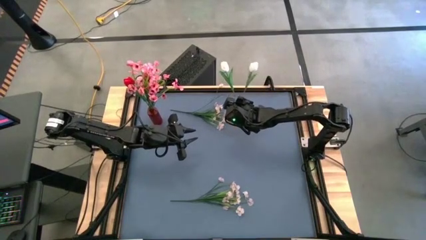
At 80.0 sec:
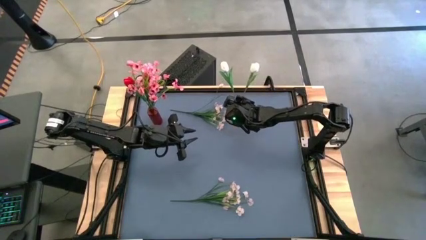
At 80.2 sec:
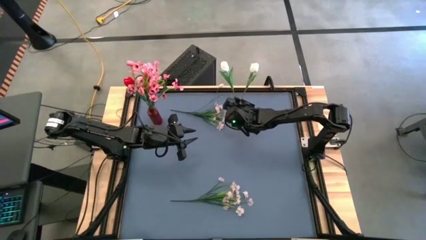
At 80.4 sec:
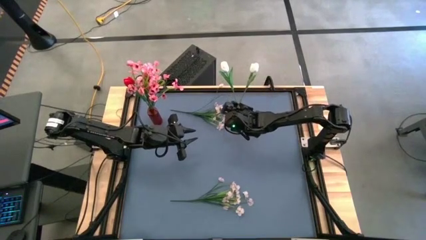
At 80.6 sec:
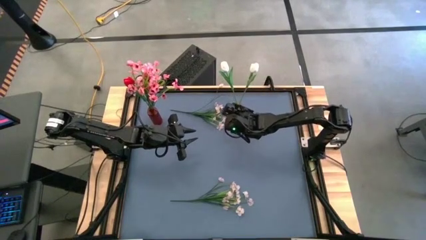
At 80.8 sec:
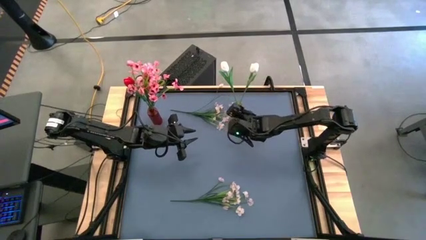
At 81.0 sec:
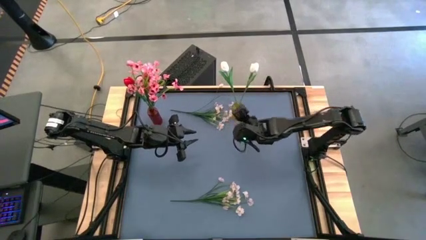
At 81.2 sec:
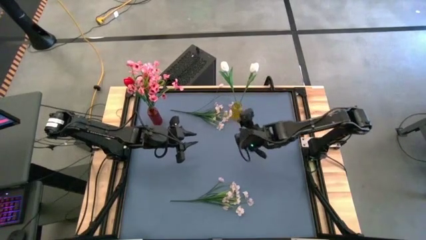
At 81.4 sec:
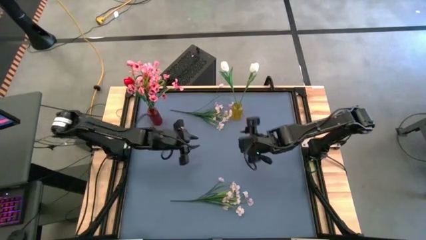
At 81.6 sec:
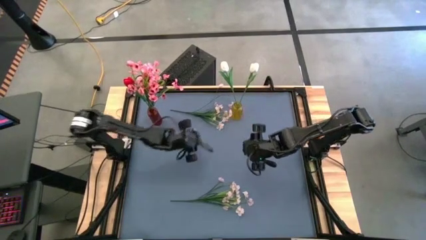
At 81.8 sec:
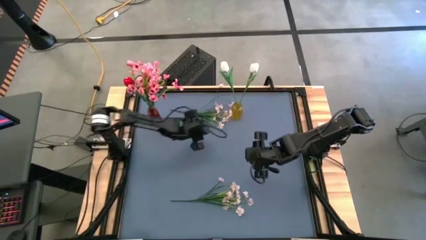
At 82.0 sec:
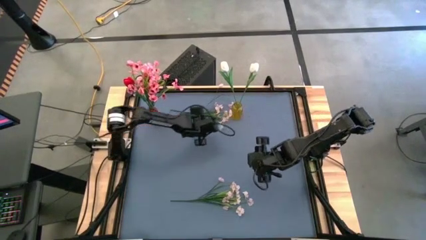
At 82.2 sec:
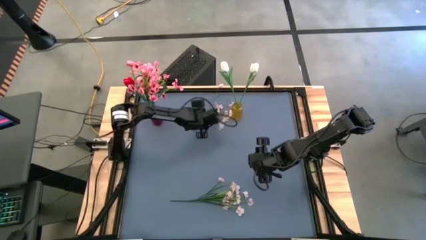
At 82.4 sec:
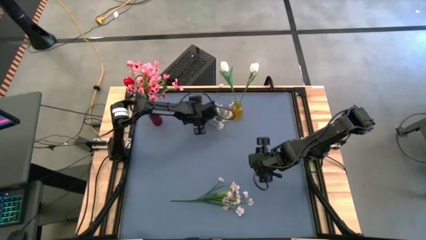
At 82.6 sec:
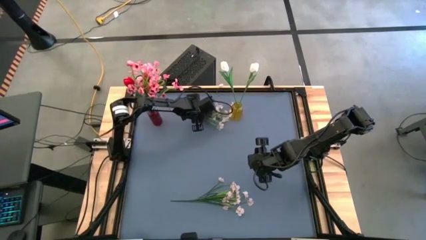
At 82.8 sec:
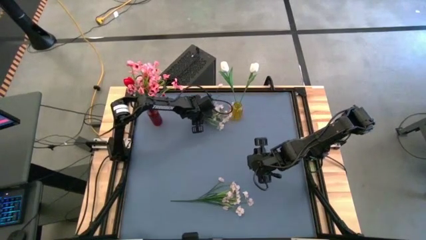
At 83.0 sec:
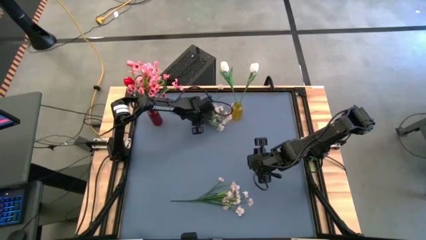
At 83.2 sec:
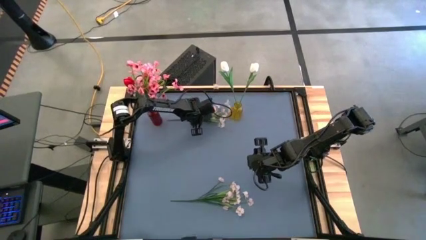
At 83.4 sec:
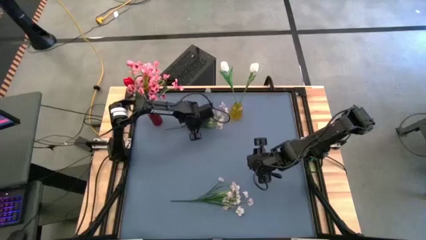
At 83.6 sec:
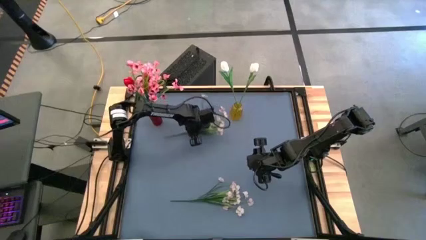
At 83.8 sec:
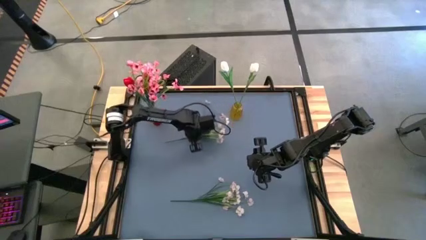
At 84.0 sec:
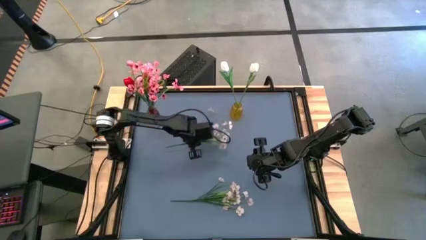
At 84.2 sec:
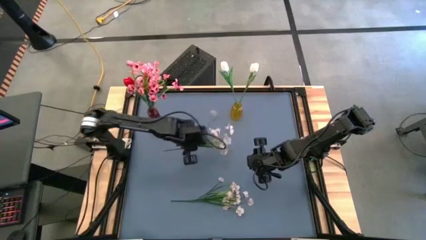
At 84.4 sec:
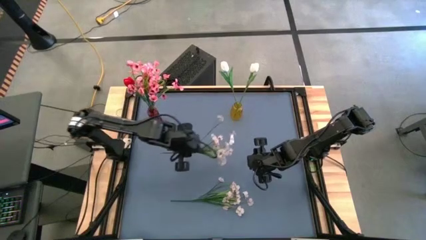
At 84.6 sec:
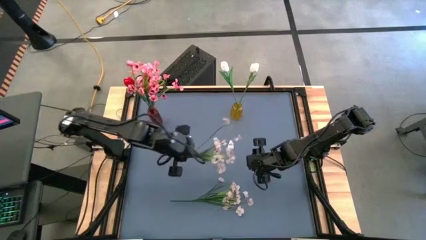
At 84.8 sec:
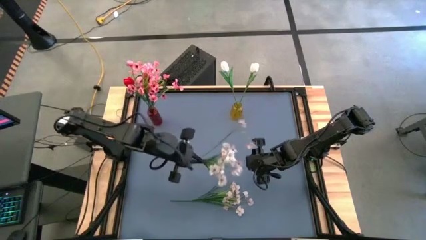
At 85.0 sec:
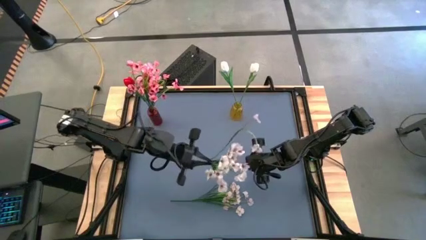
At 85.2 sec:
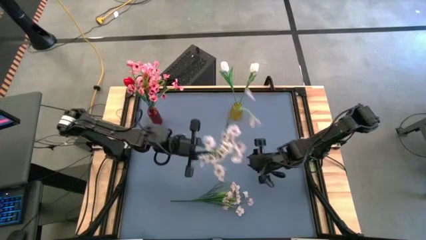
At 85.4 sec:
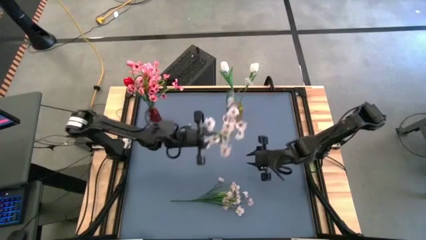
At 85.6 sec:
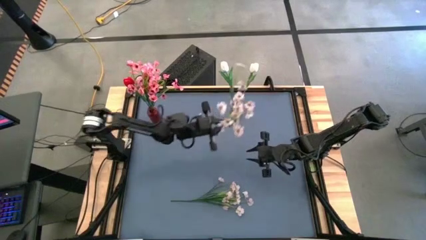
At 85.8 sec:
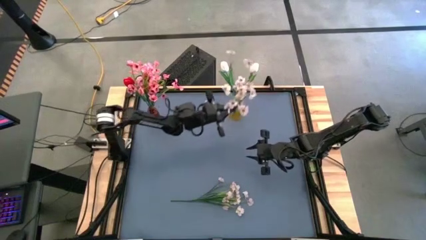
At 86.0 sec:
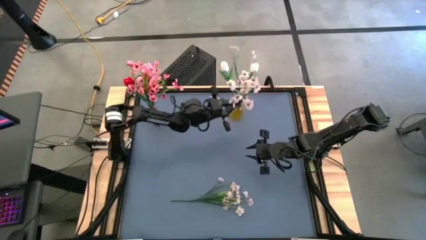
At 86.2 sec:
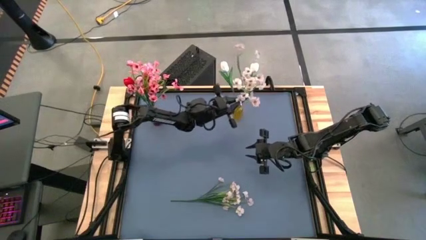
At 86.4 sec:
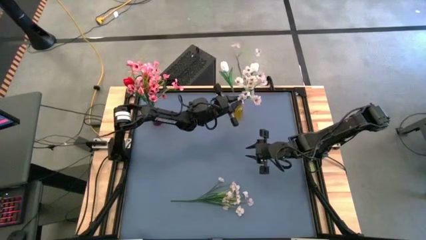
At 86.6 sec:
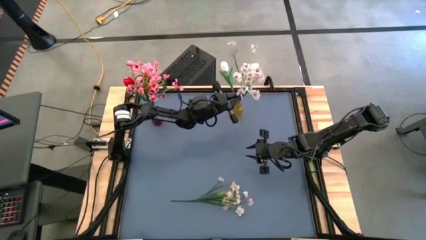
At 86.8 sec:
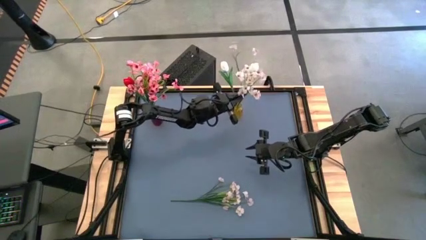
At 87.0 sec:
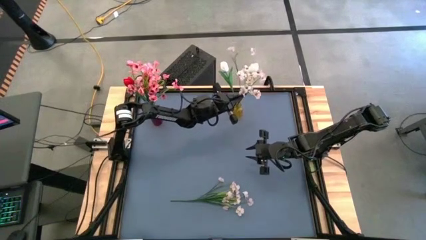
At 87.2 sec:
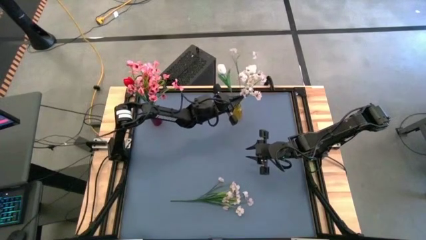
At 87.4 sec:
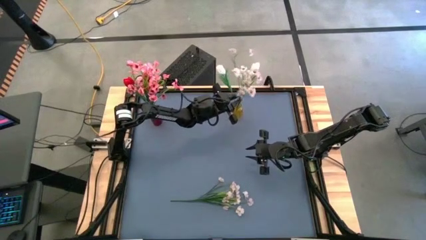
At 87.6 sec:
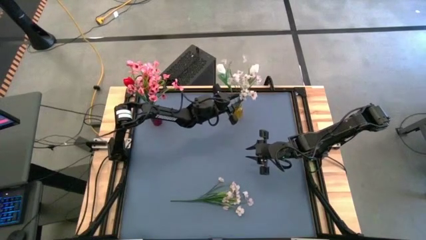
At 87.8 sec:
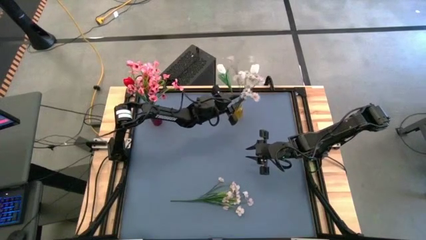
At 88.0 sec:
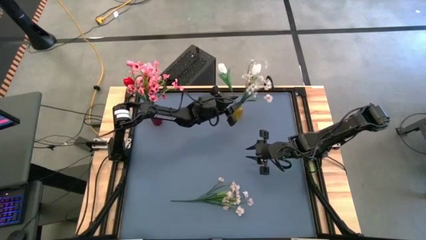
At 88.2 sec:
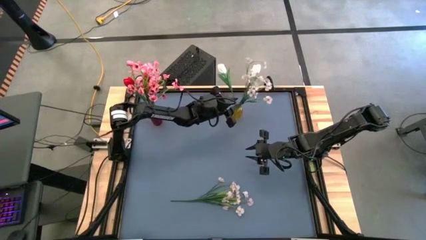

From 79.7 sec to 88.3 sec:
Task: Sort flowers into vase by color
Put the top white flowers into the yellow vase

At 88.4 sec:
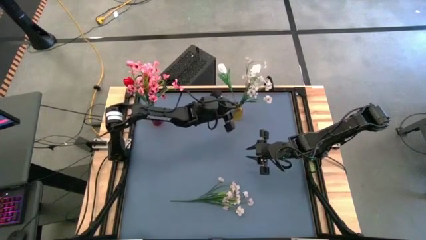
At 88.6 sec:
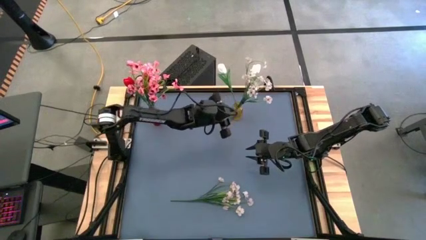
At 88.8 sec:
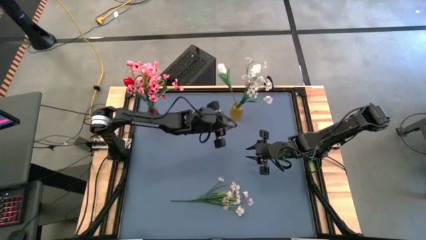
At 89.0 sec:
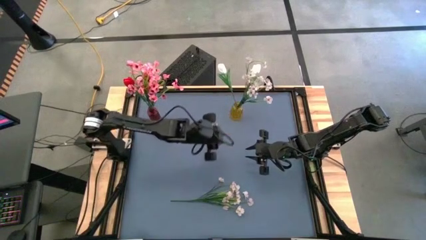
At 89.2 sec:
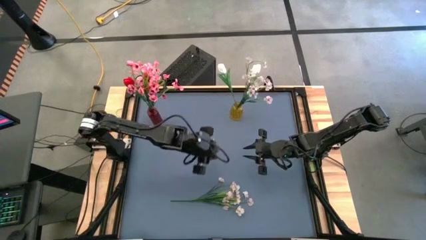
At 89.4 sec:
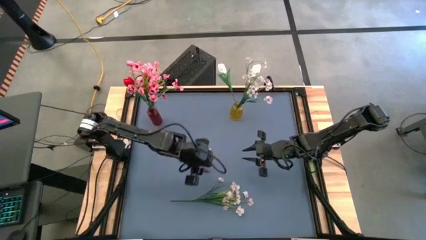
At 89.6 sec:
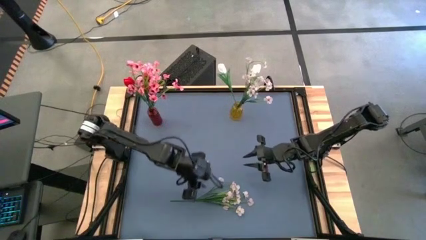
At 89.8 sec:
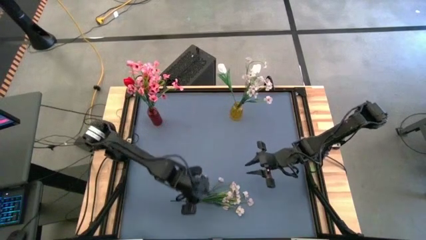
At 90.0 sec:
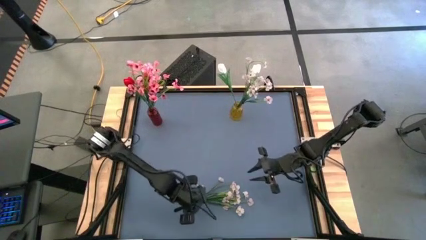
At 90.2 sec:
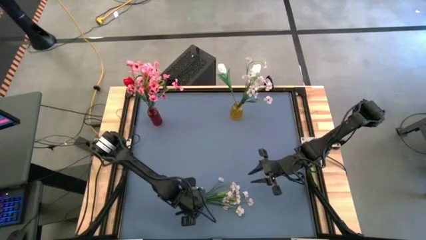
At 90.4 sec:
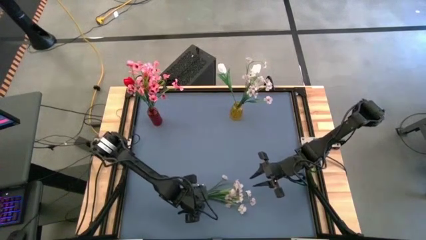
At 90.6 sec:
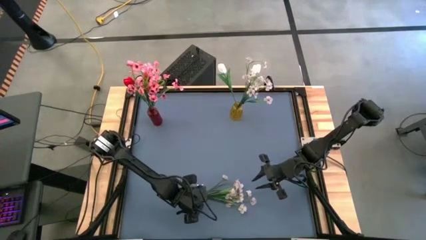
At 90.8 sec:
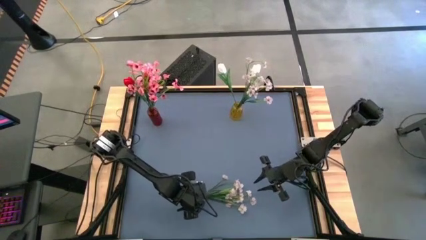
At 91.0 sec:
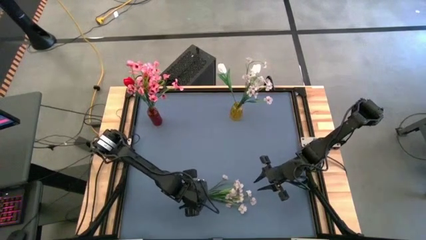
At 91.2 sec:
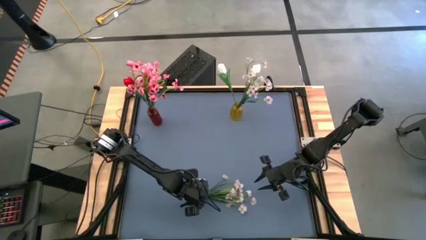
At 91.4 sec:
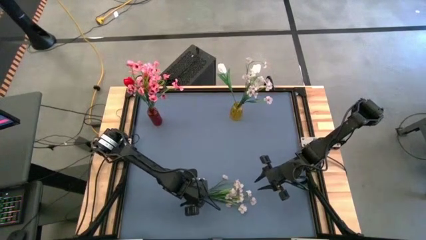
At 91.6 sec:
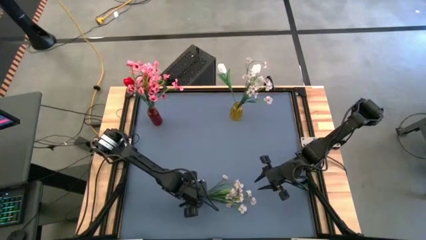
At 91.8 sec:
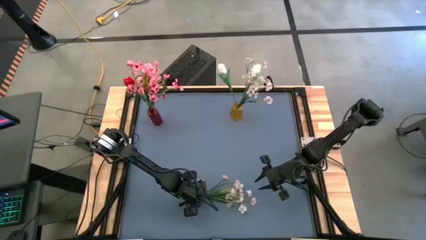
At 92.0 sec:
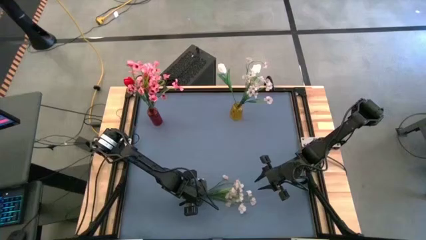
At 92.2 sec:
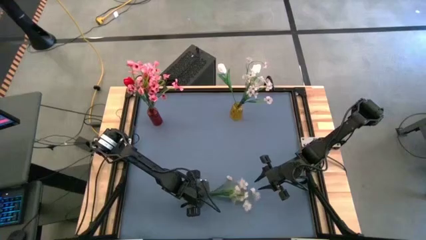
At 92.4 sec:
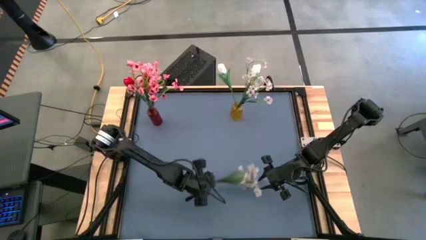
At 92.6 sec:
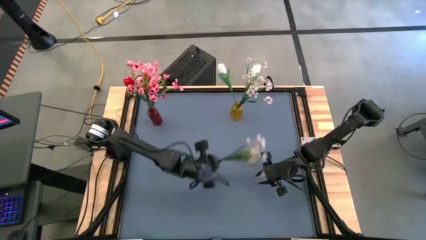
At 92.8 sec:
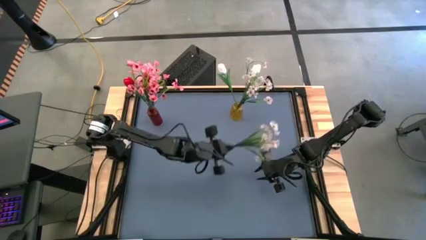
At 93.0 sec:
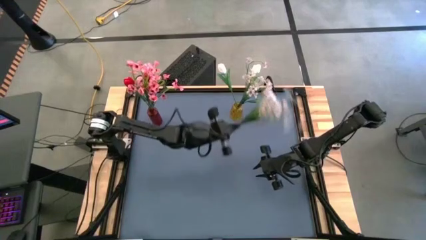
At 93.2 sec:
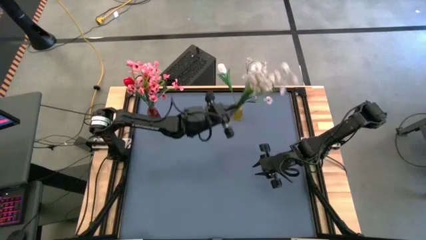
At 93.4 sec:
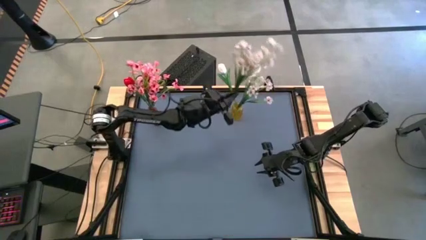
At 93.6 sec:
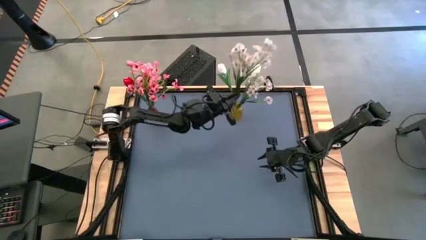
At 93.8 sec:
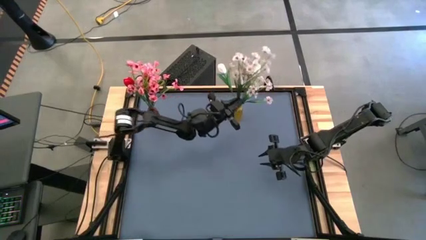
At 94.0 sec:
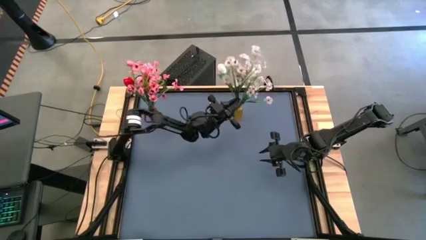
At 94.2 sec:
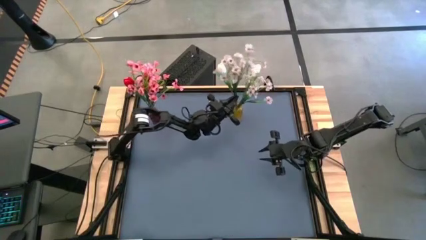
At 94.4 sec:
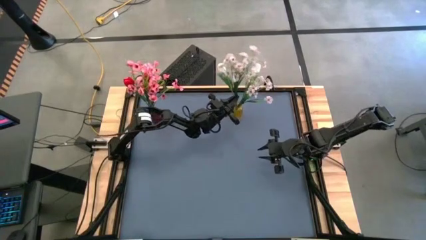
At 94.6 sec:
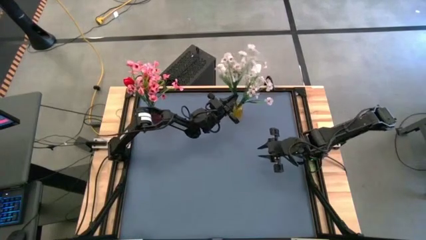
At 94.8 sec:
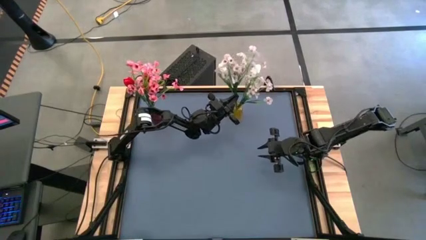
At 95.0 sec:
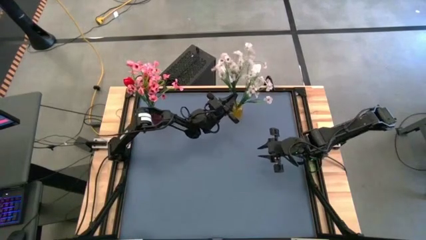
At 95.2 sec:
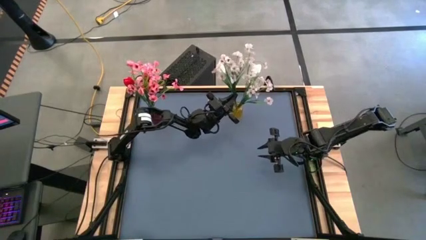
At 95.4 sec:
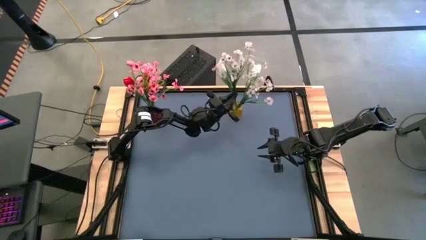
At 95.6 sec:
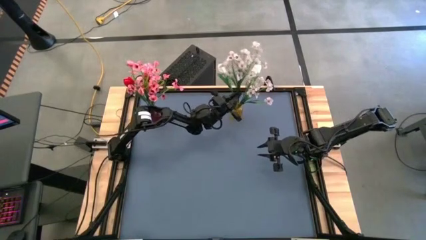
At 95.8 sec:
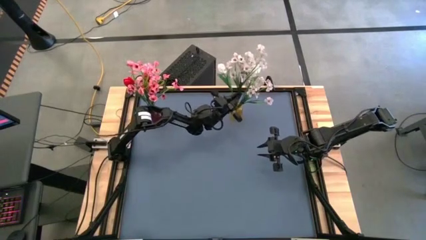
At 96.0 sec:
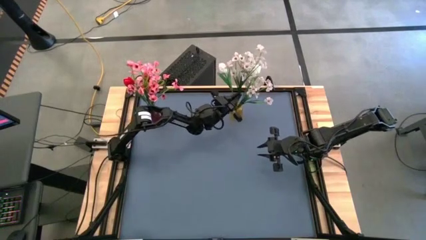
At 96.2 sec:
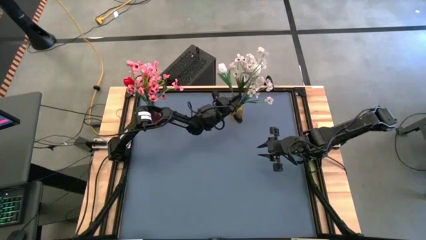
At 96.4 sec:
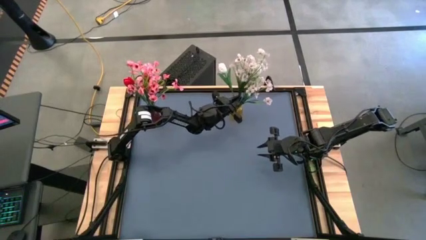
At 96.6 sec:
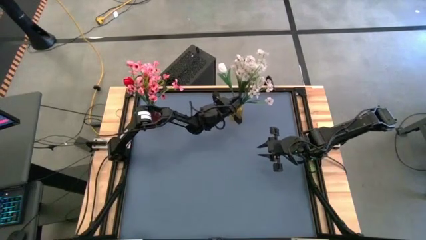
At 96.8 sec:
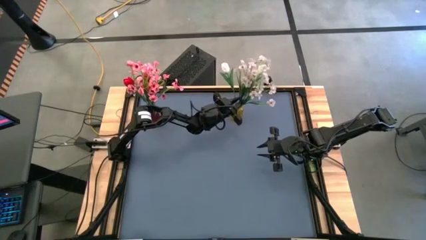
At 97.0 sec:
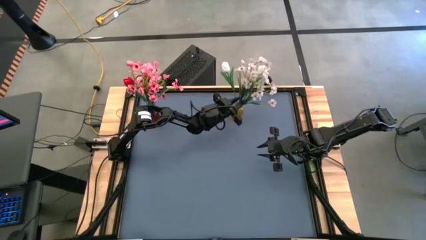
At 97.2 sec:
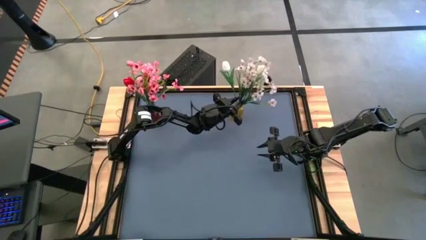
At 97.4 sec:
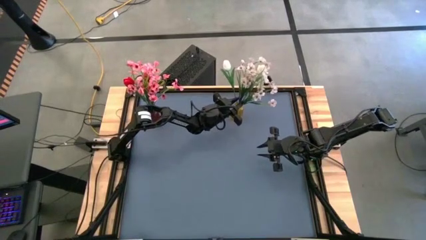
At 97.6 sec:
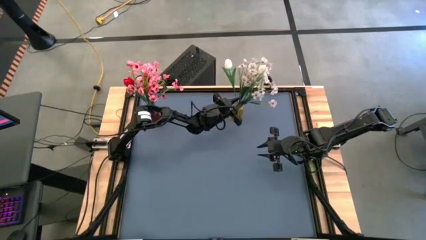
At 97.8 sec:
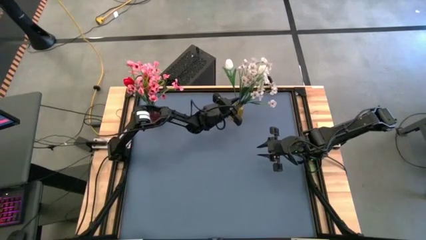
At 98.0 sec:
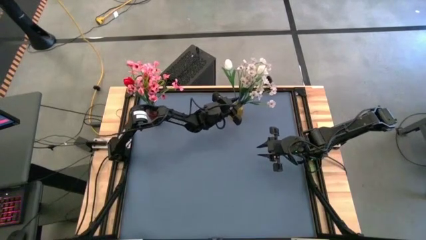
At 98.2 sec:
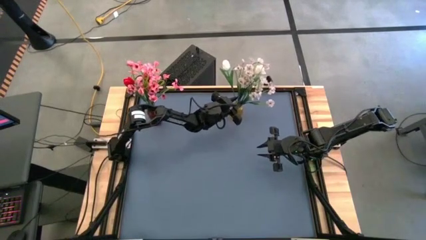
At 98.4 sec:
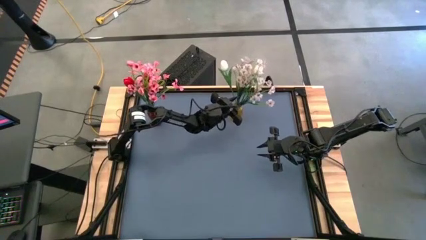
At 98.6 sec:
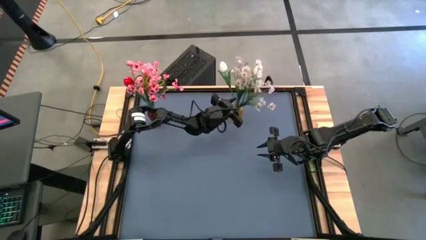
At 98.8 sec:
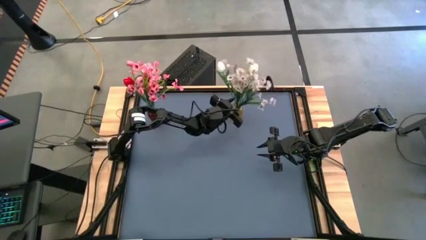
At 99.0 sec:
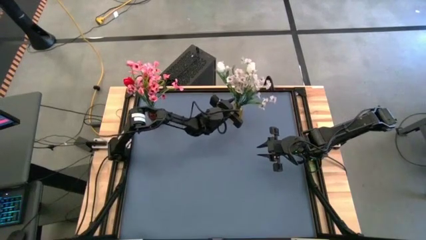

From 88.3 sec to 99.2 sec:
Put the white flowers into the yellow vase
